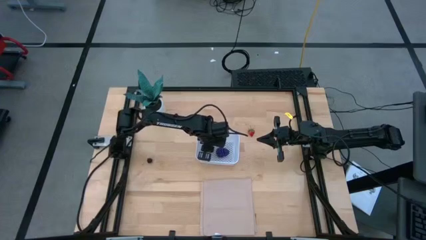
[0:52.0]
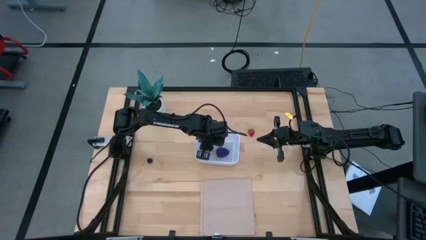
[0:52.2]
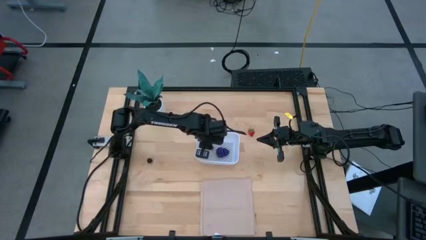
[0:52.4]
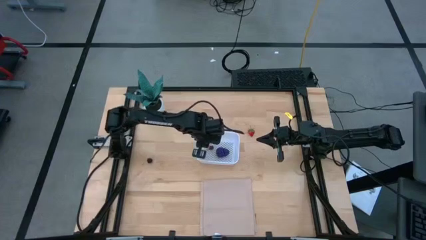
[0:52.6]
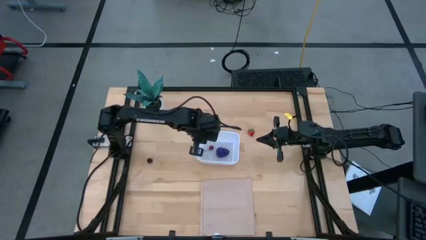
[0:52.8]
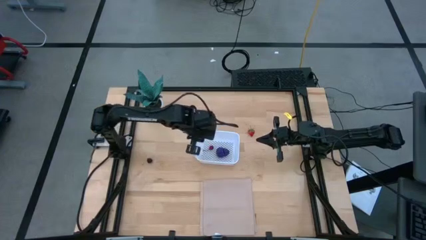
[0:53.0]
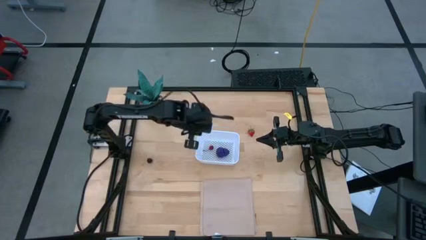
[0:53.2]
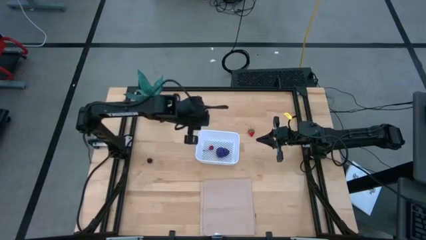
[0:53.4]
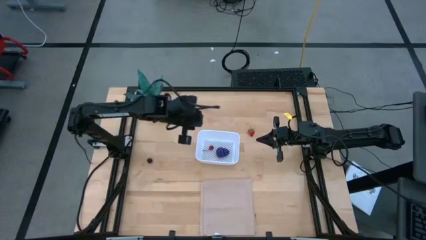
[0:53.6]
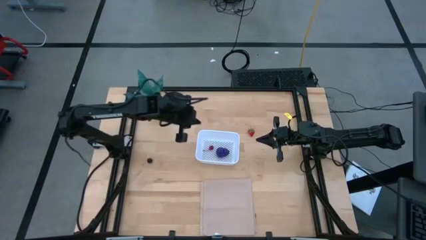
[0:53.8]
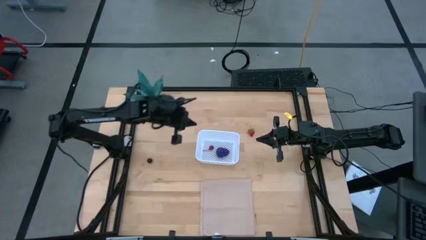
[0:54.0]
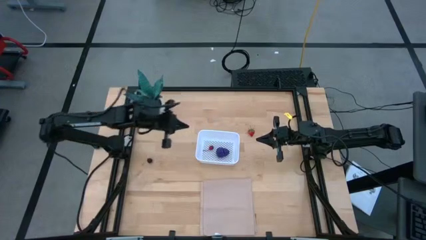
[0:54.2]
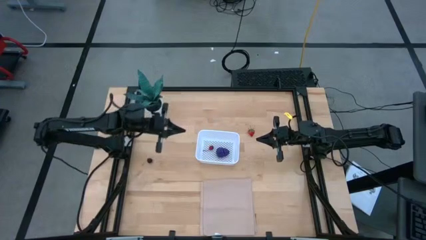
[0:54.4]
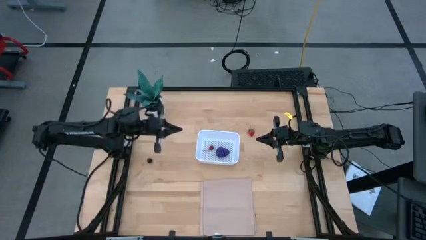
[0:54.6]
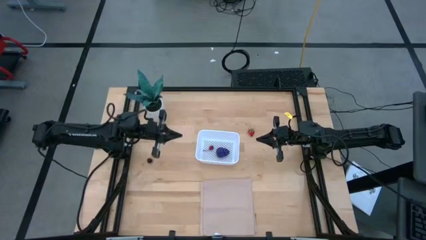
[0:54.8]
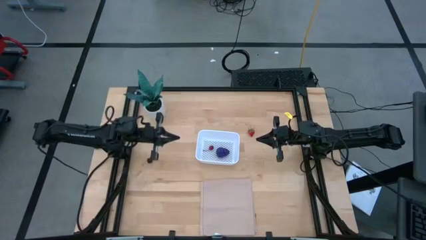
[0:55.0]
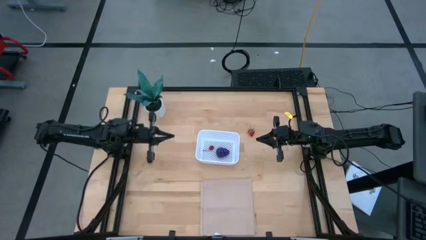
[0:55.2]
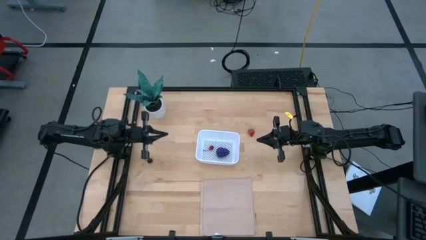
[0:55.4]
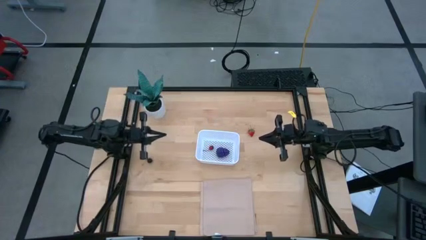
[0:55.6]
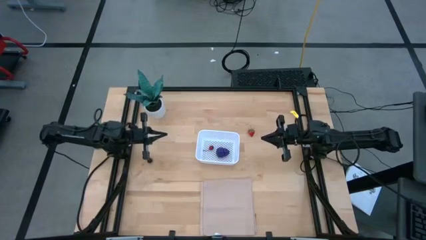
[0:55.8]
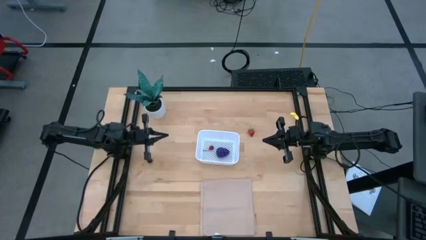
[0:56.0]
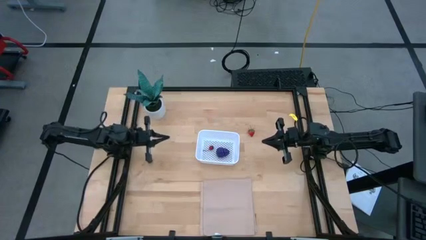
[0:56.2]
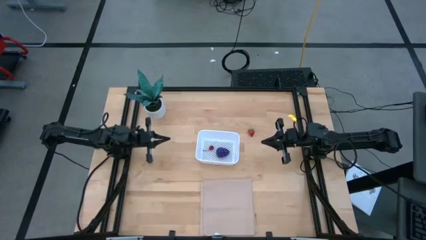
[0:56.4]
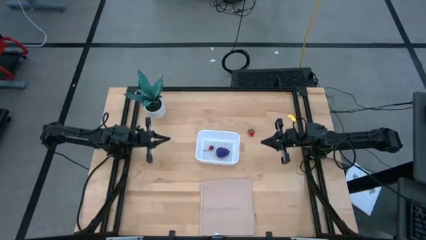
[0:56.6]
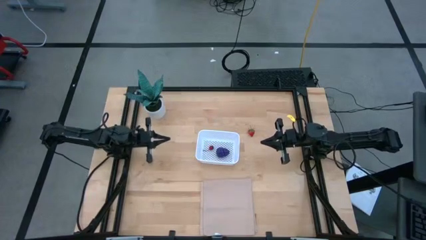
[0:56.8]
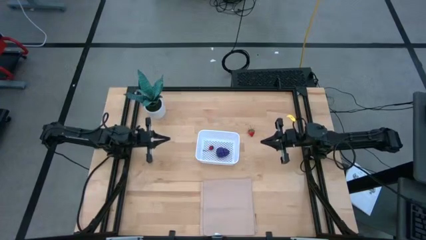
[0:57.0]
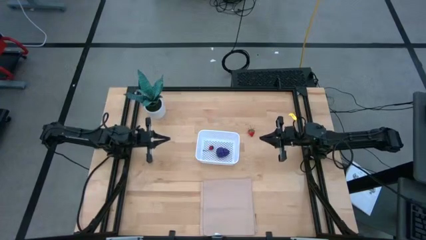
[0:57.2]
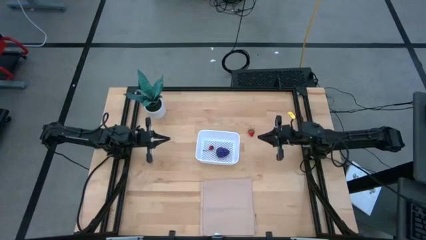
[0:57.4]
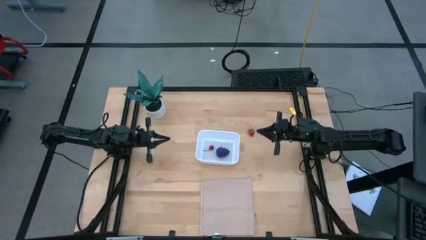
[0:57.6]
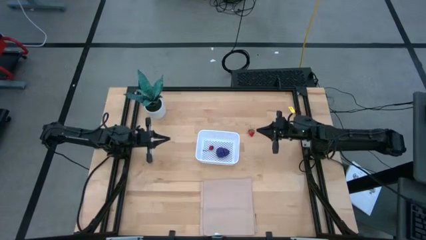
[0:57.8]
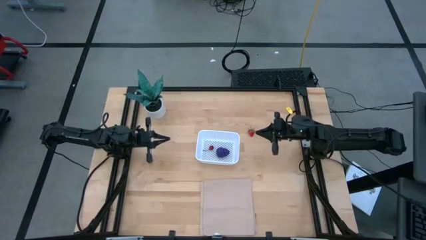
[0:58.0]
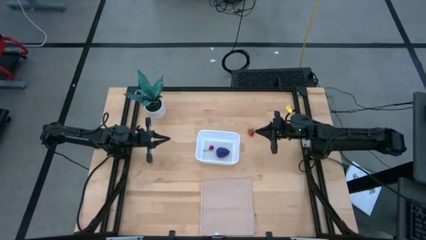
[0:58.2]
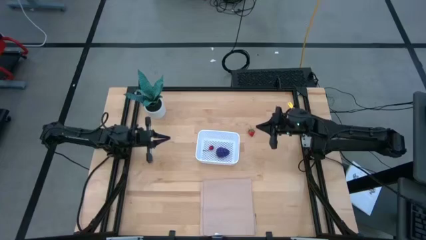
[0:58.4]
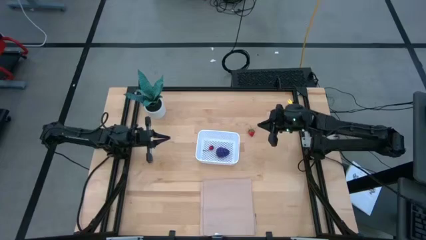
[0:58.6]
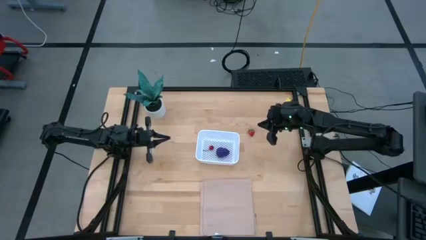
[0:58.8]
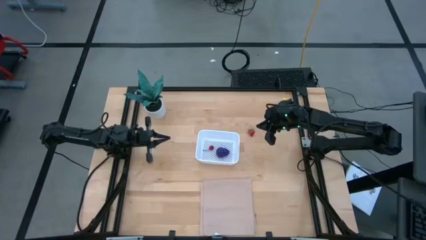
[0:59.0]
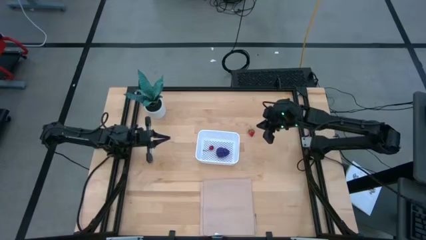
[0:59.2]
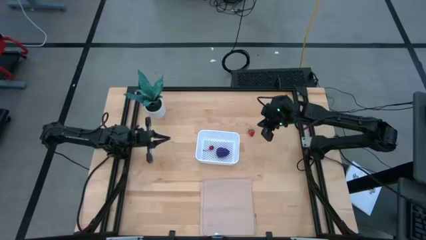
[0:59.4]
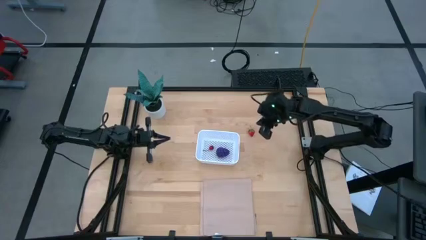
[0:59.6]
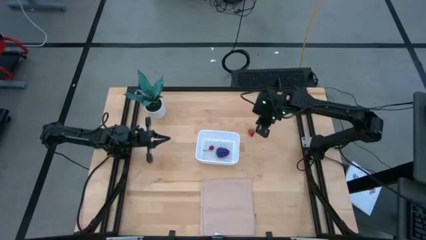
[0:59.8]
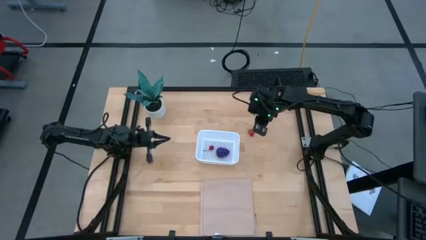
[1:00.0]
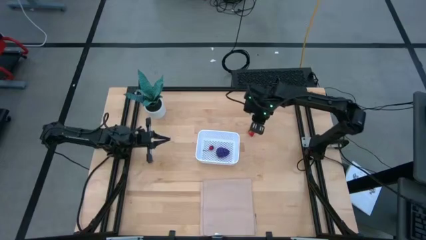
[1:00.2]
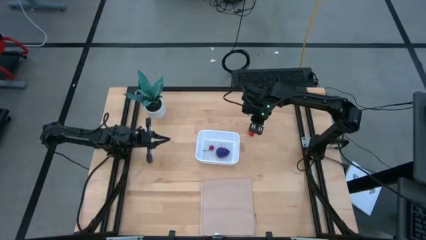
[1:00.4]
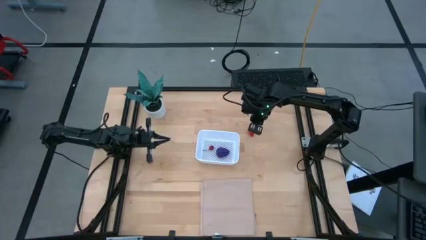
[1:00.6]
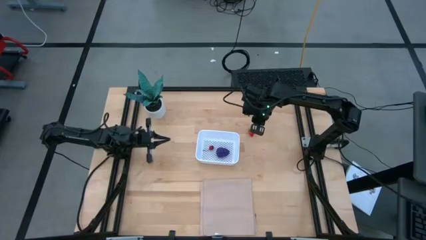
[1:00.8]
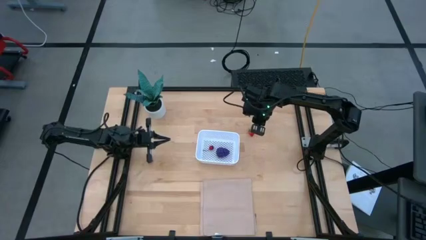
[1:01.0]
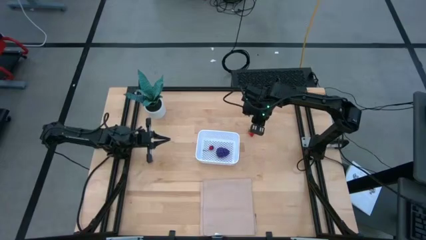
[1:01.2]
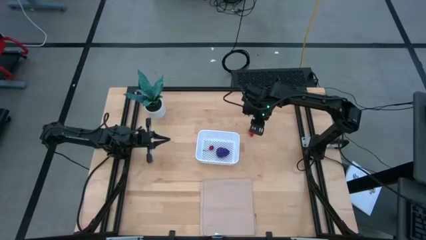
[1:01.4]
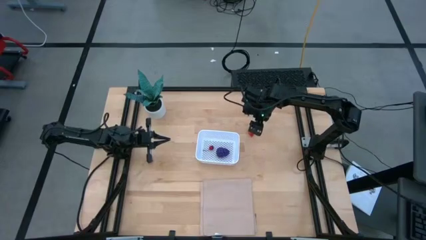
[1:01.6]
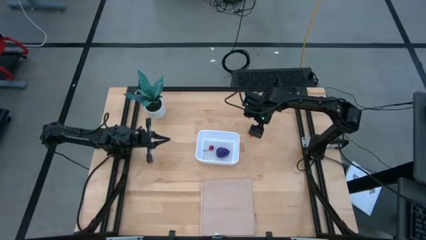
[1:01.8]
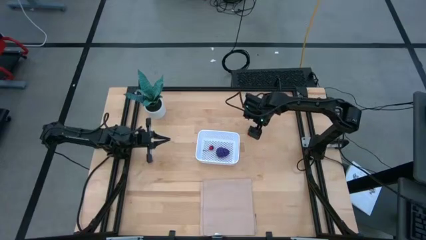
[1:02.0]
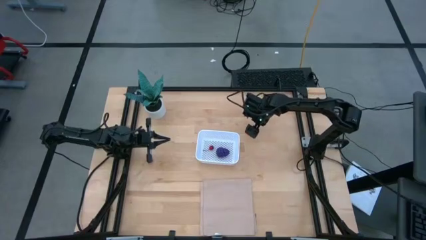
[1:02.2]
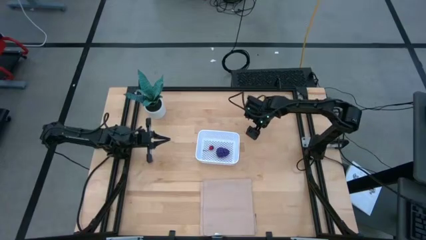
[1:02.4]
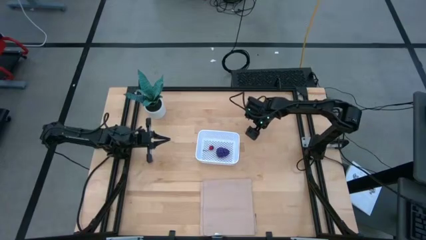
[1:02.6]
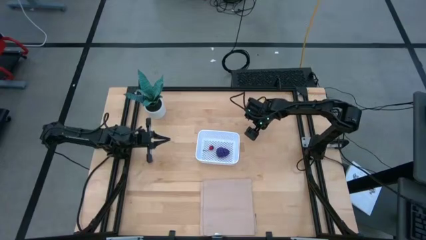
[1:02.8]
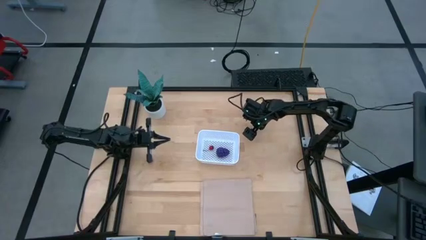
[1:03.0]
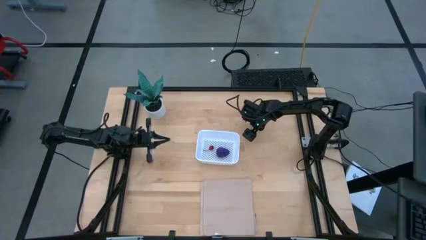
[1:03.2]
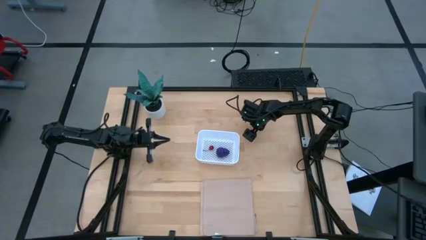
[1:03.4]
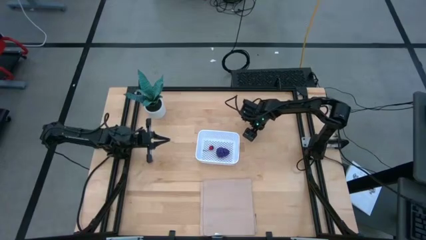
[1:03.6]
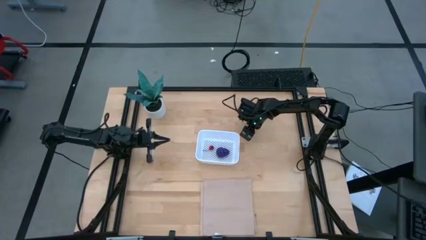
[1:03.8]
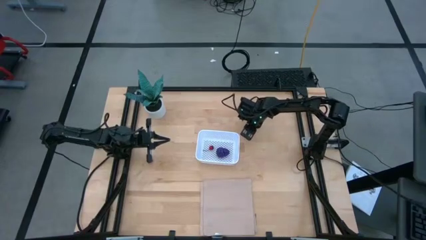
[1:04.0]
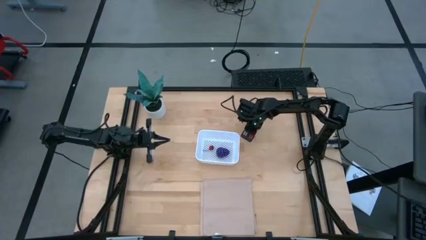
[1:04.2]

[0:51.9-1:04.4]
Task: Pick and placing Produce into tupperware
Put the red strawberry into the white bin
